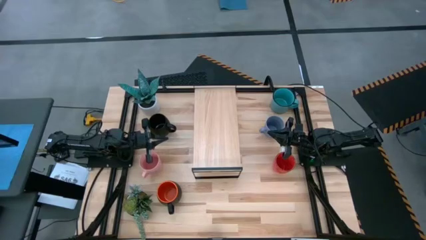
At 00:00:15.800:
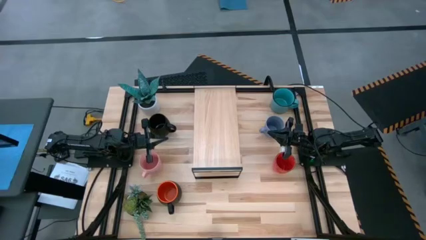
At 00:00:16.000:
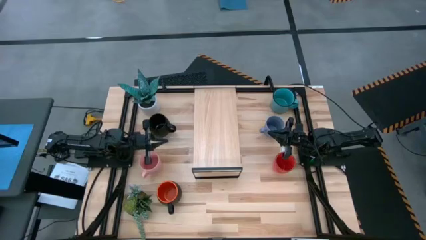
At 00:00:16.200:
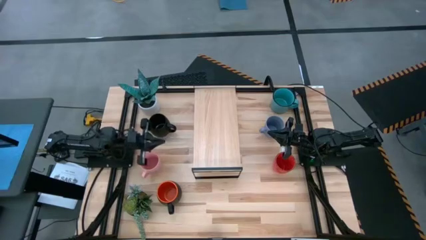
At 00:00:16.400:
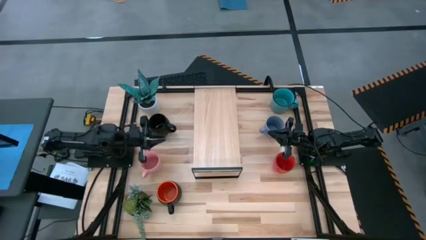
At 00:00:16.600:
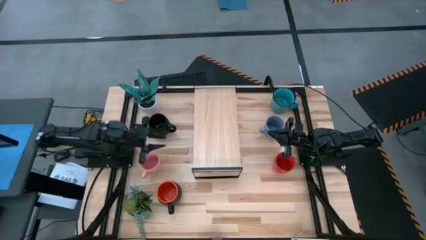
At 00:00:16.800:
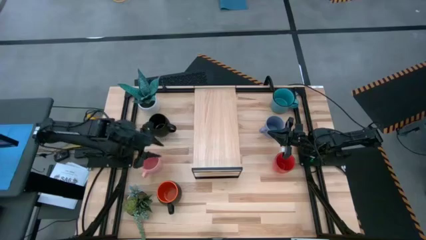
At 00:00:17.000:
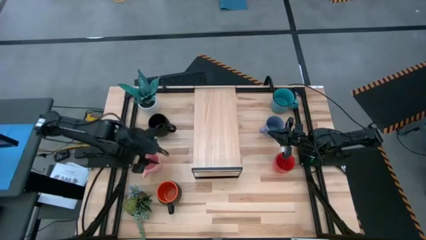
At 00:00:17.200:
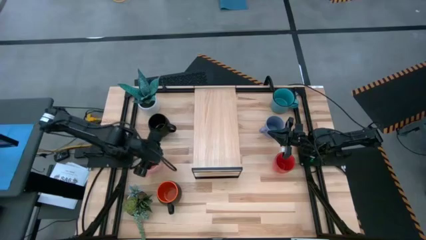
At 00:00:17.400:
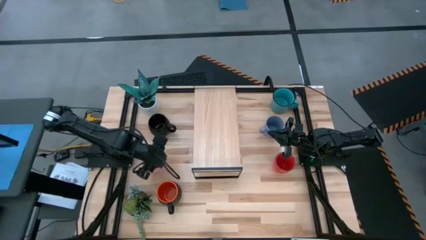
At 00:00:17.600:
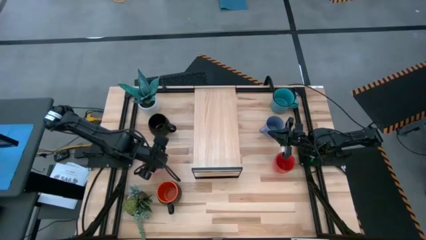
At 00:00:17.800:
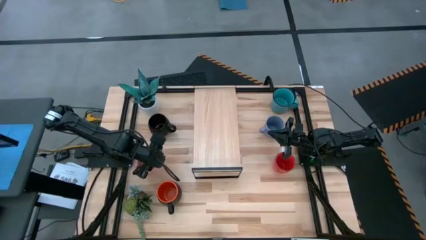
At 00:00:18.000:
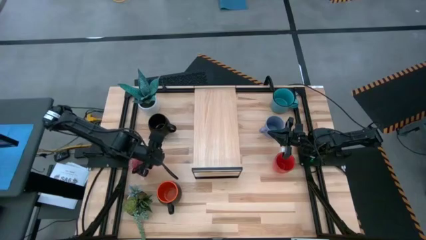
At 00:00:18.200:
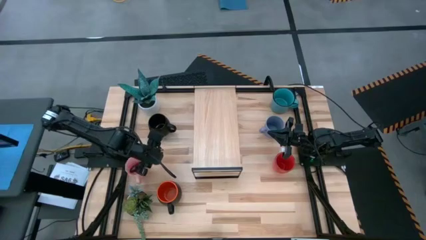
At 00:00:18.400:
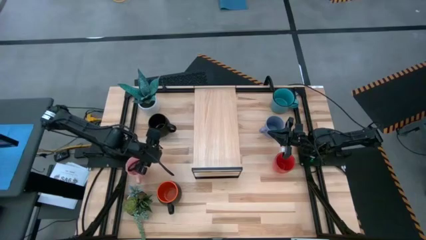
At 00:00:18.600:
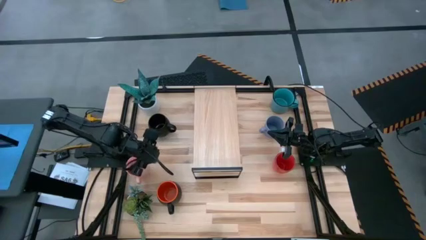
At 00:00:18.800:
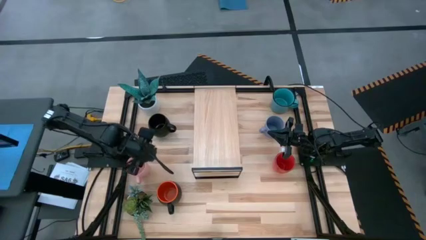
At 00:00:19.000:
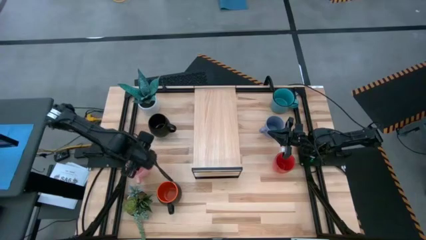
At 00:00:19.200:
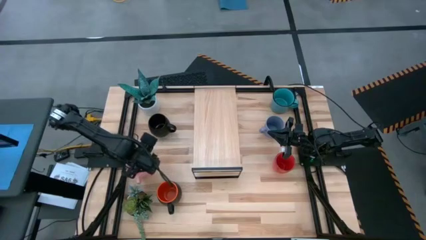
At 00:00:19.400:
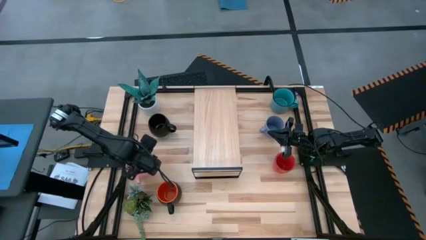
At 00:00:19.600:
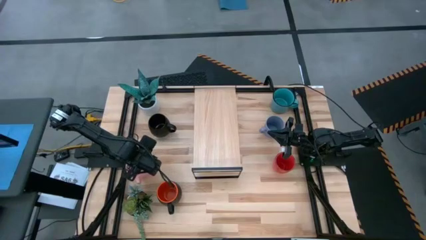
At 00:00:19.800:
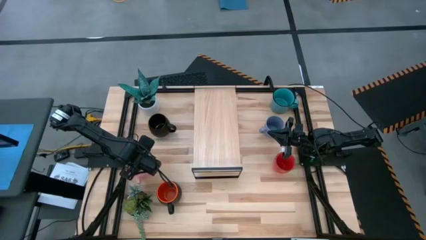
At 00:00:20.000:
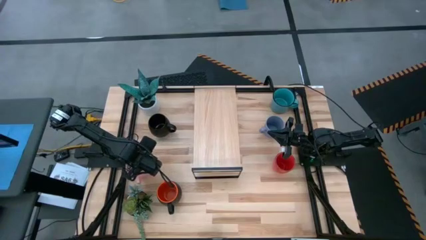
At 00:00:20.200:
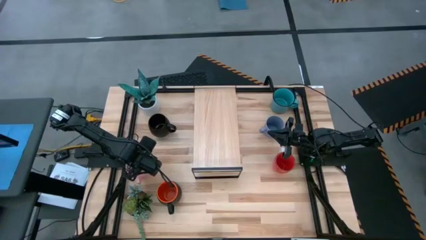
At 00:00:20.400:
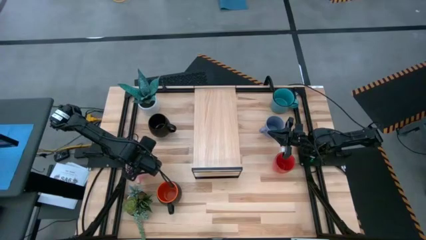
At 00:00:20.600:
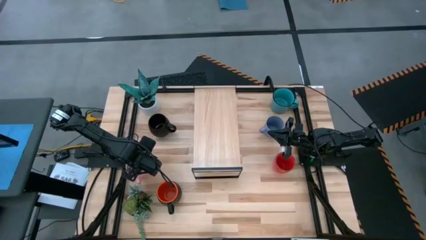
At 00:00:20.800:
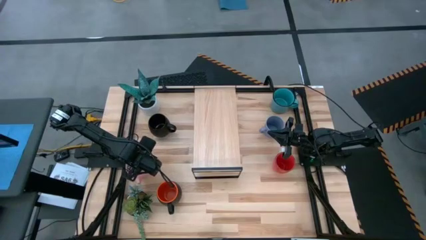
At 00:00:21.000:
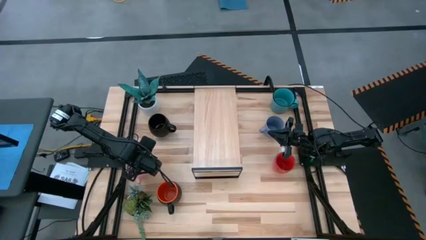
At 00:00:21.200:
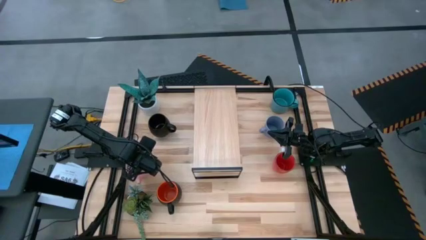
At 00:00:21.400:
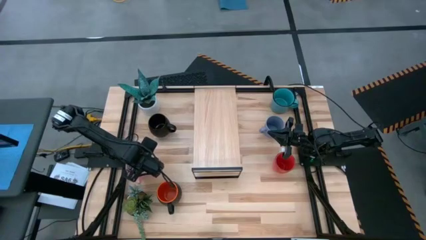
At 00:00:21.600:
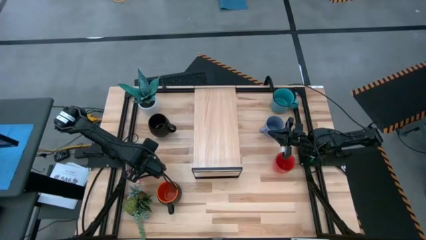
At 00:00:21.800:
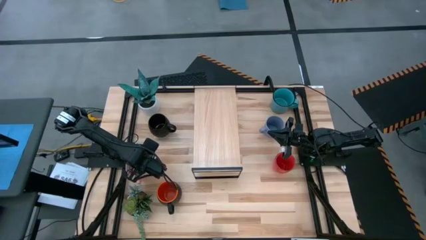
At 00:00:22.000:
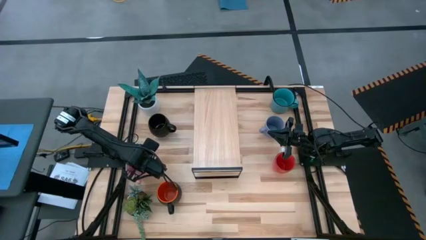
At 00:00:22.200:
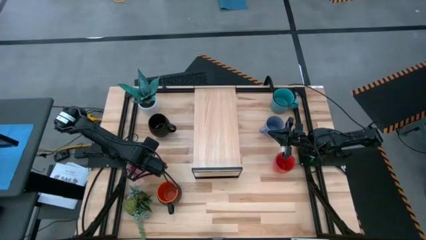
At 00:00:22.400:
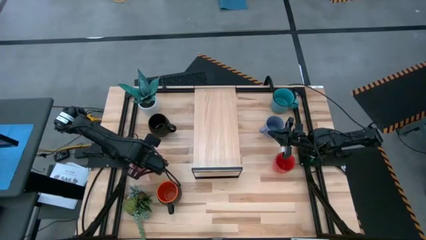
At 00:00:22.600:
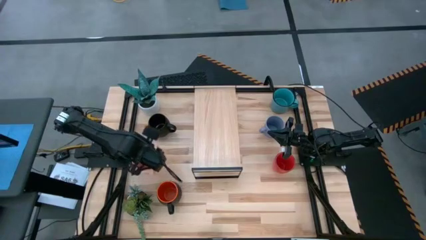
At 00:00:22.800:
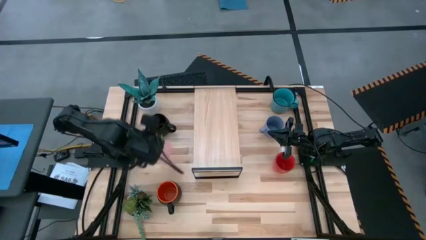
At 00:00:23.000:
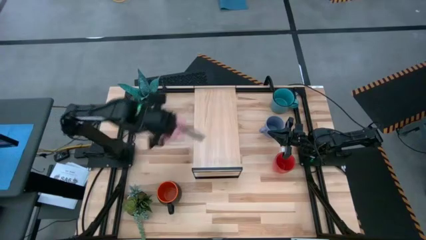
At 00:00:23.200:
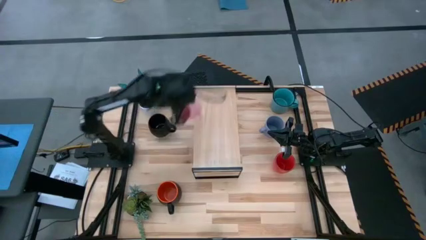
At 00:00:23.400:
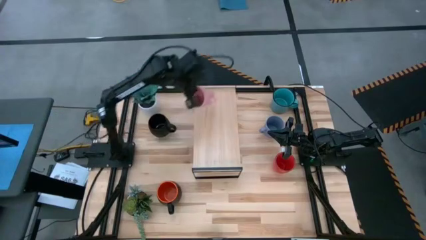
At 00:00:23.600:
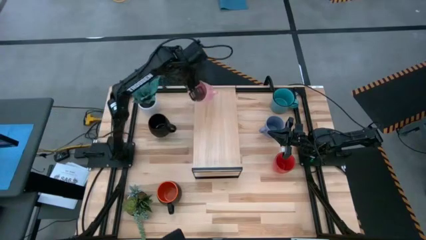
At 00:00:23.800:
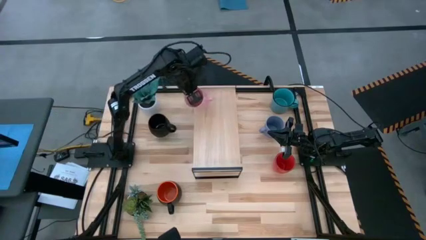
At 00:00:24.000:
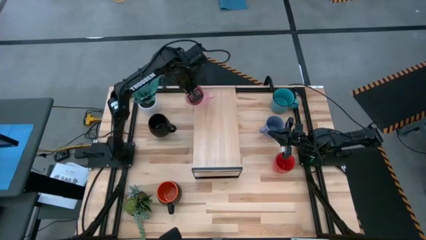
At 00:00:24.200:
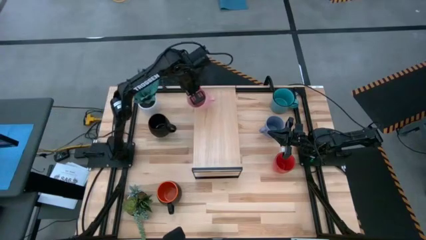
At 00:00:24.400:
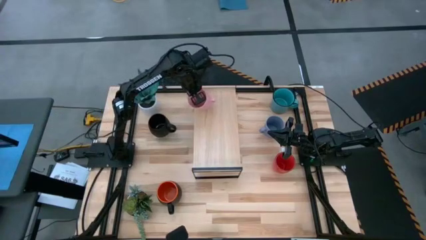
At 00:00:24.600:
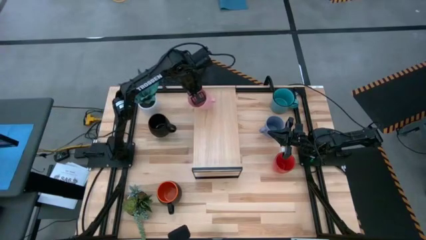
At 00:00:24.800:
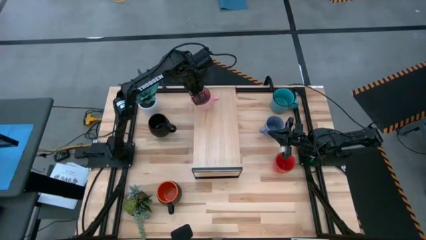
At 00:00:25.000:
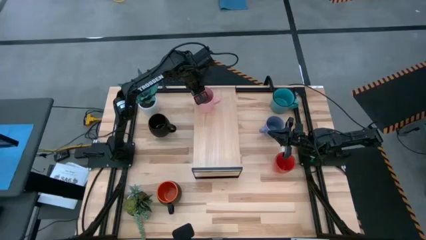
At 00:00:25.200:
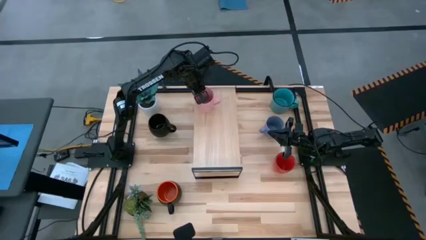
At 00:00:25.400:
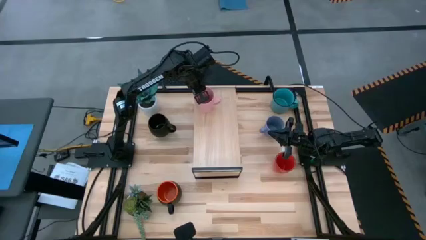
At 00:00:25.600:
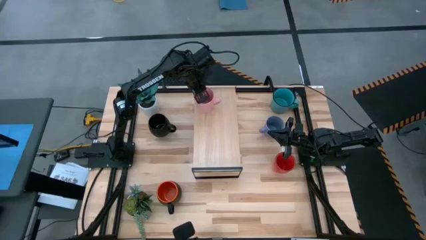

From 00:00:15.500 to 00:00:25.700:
Task: Place coffee mugs
Put the pink mug on the shelf

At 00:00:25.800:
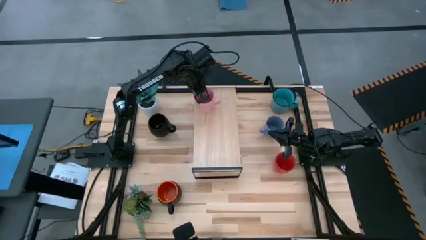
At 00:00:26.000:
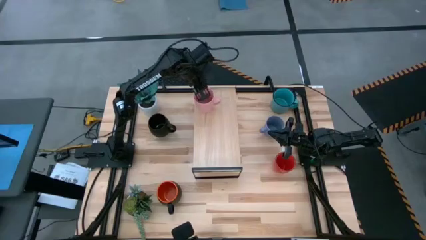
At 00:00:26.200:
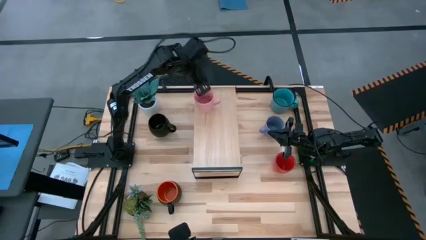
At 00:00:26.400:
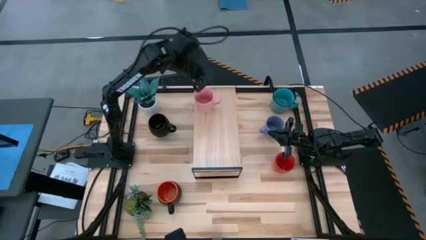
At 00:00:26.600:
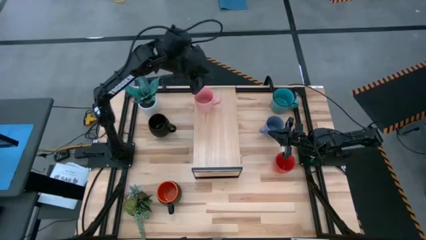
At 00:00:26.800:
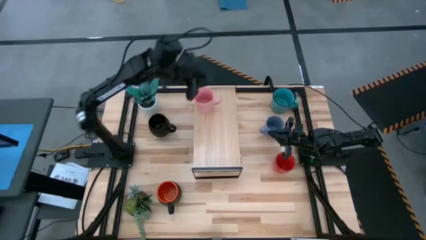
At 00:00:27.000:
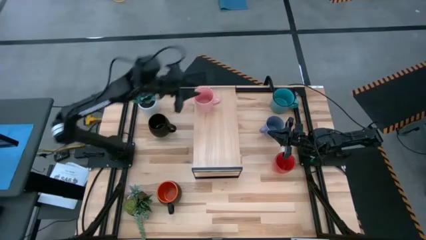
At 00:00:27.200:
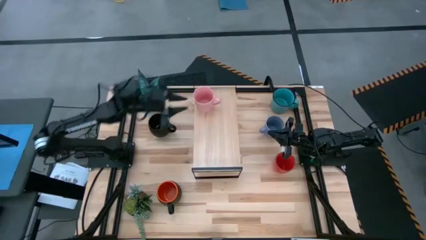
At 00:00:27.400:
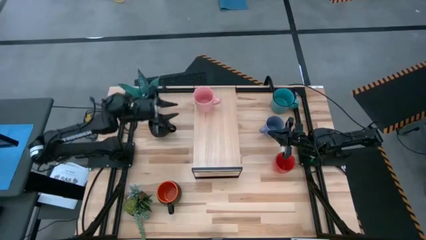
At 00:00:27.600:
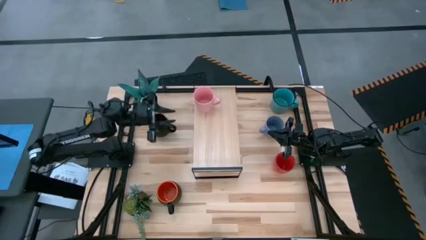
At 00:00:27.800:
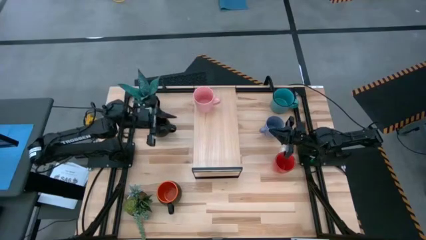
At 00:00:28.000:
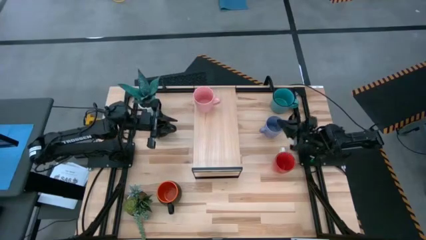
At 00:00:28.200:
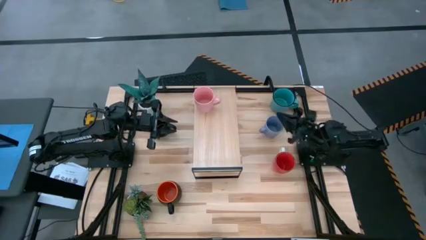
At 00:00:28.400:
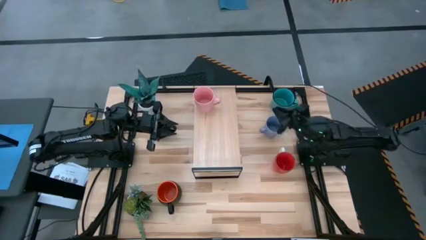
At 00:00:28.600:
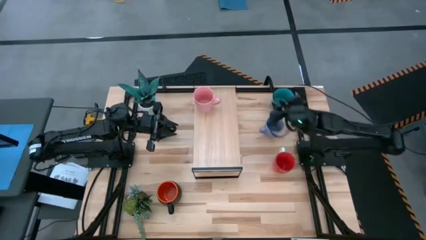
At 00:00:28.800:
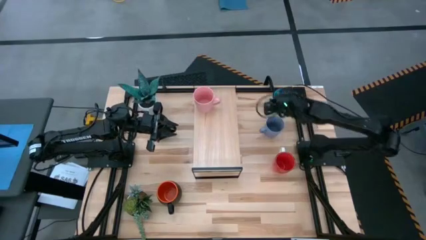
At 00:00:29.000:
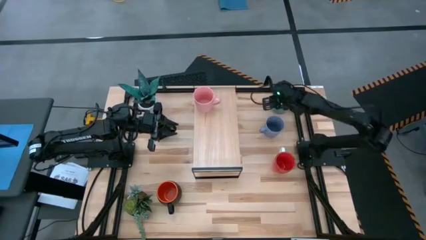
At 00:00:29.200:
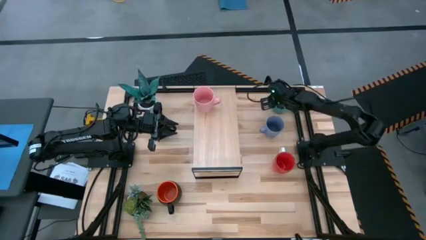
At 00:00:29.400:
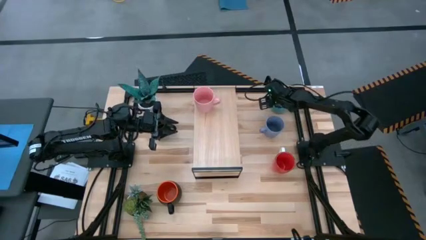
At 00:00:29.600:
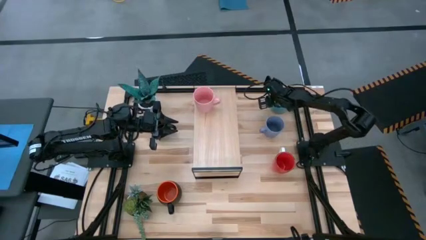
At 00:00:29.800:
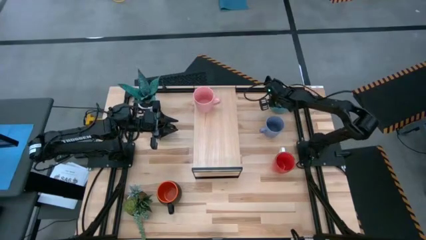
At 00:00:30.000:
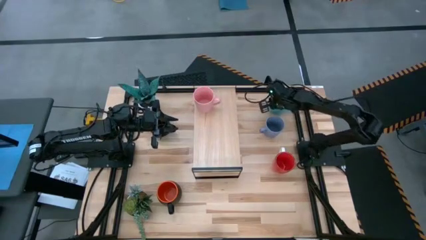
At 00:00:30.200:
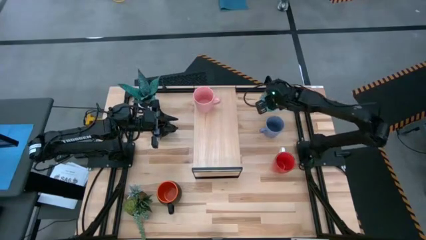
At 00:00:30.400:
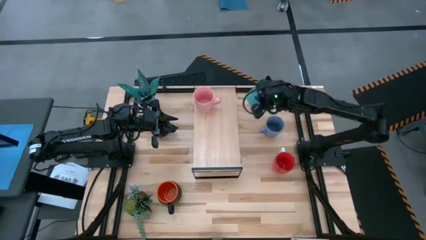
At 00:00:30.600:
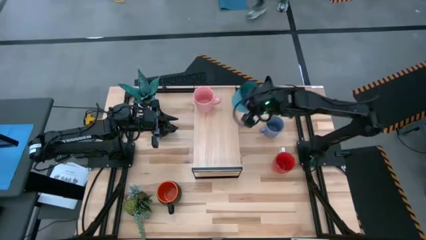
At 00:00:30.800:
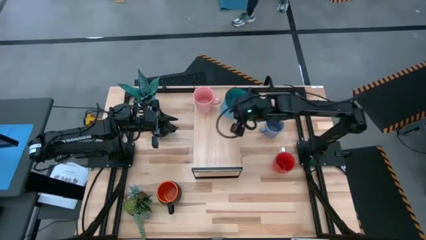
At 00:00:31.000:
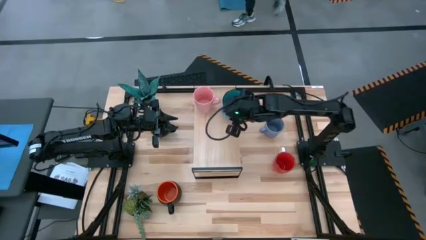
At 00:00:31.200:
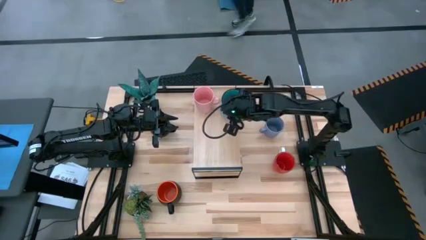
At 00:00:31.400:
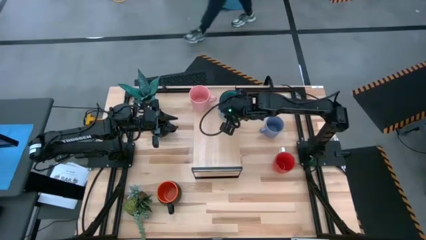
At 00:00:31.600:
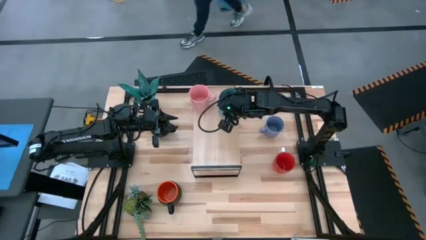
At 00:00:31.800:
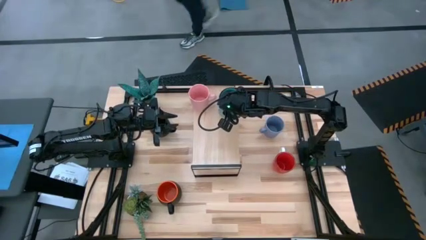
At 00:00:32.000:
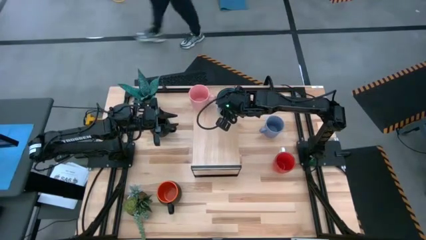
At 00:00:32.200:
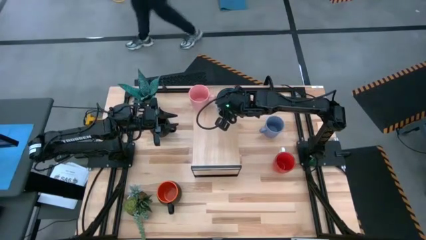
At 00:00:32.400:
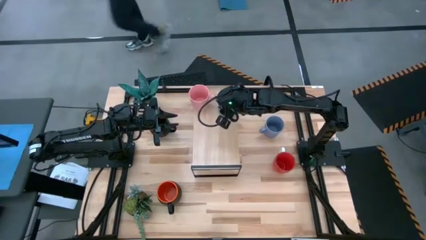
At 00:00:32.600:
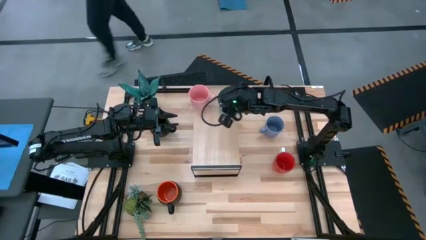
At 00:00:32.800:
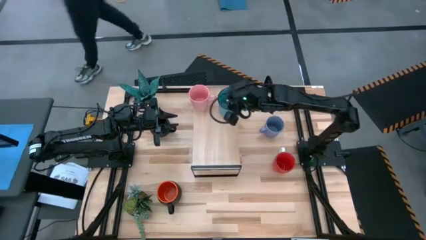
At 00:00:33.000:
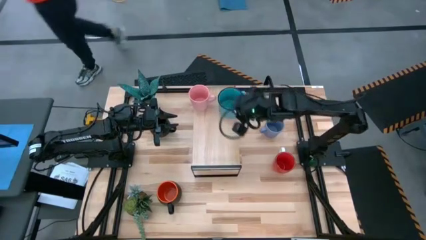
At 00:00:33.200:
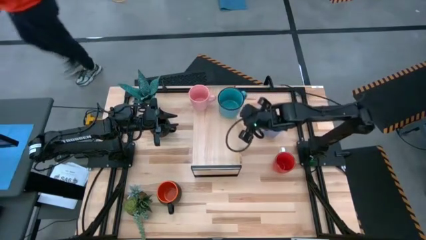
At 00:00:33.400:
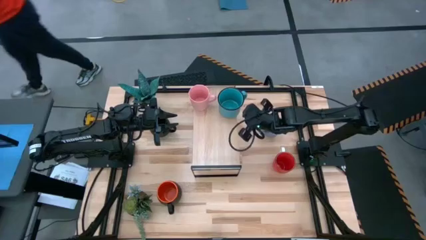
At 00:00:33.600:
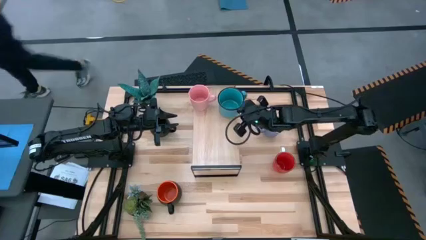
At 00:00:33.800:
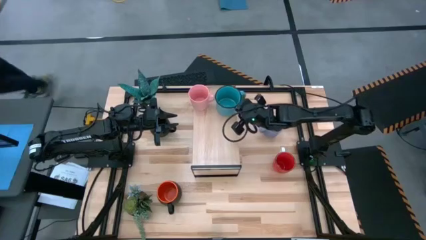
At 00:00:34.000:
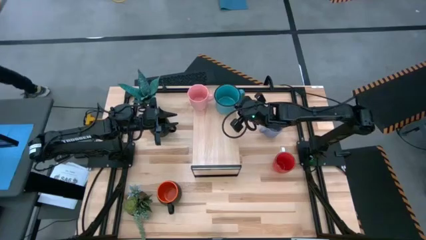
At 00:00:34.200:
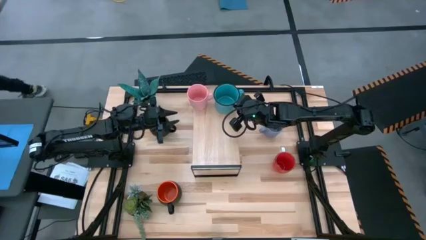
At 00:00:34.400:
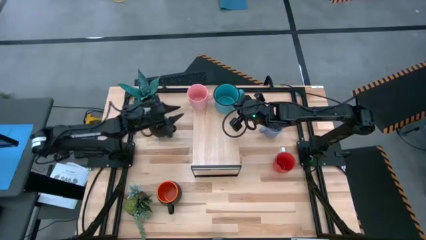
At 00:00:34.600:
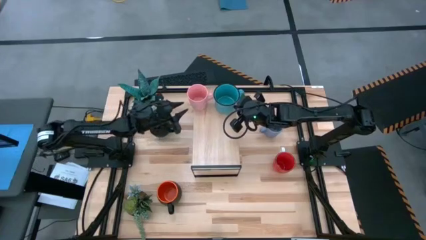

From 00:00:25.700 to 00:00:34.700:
Put the green mug on the shelf
